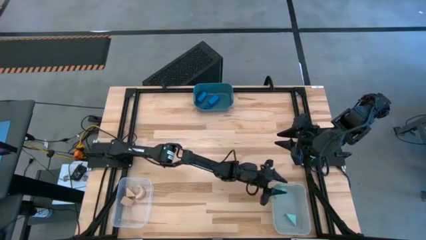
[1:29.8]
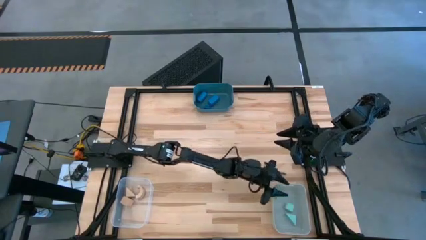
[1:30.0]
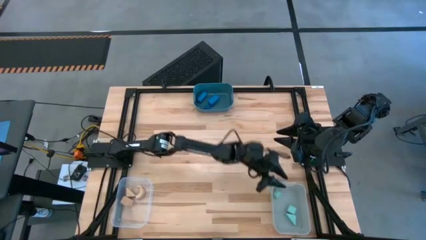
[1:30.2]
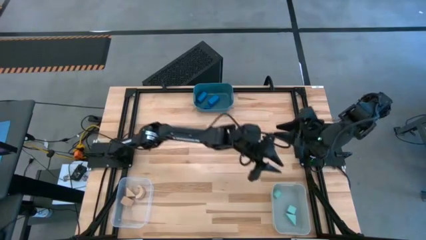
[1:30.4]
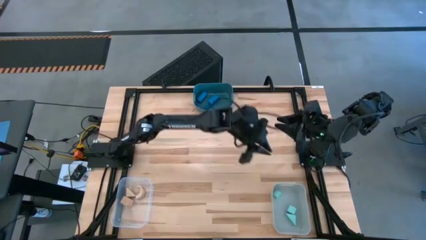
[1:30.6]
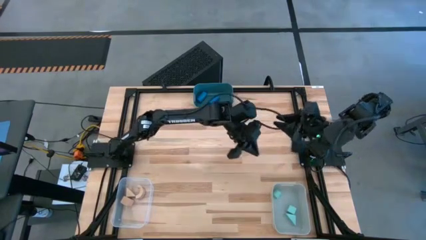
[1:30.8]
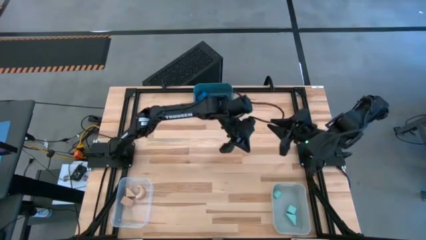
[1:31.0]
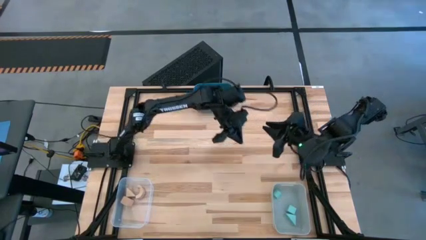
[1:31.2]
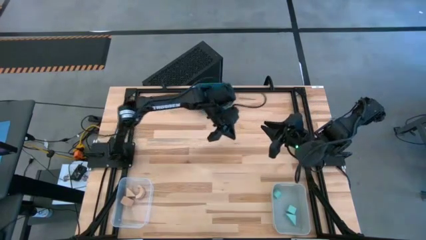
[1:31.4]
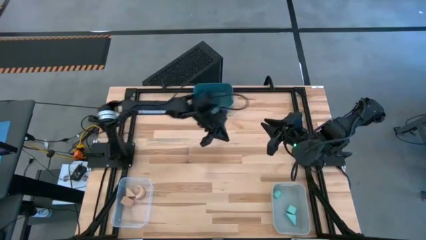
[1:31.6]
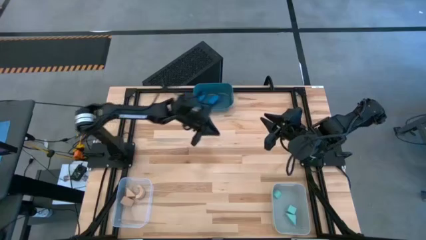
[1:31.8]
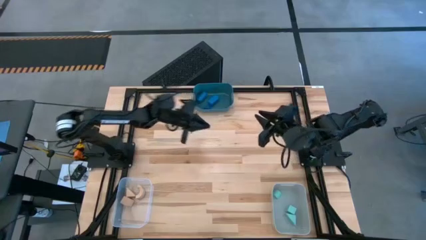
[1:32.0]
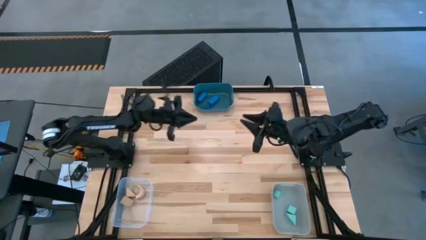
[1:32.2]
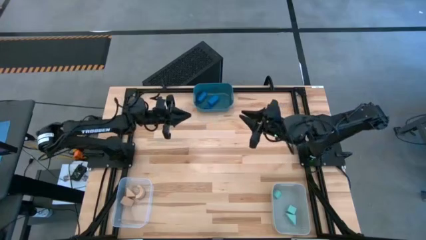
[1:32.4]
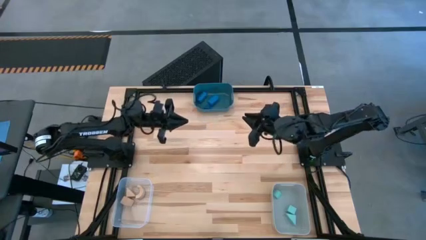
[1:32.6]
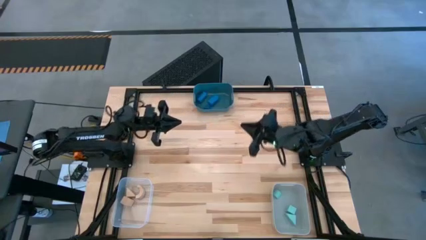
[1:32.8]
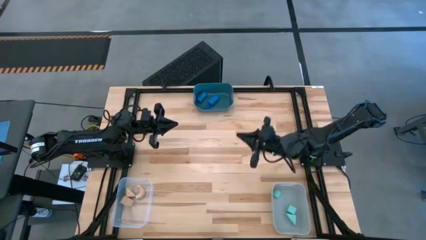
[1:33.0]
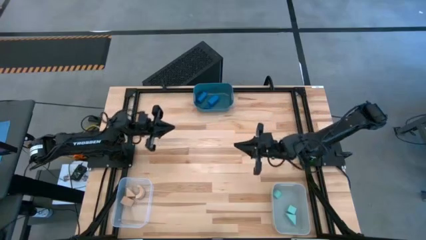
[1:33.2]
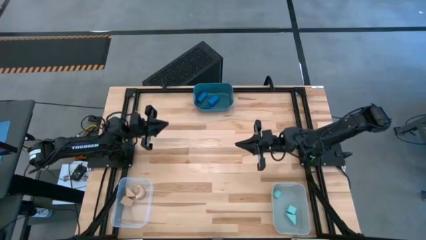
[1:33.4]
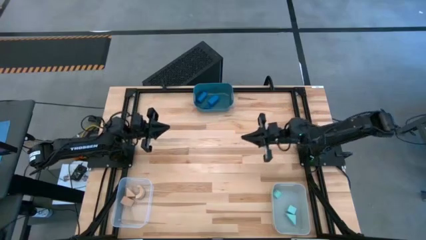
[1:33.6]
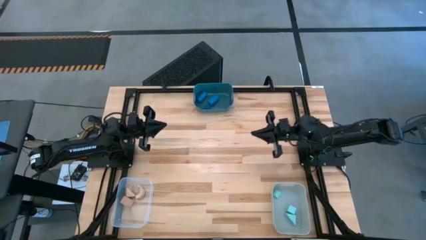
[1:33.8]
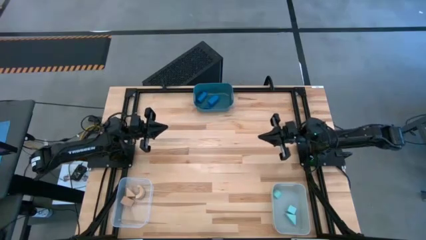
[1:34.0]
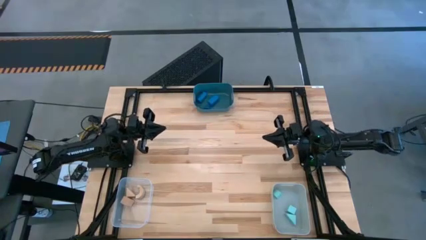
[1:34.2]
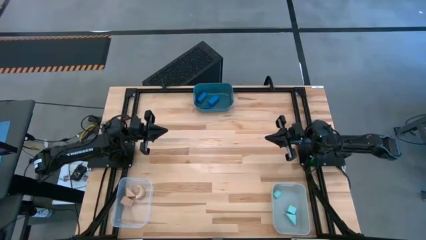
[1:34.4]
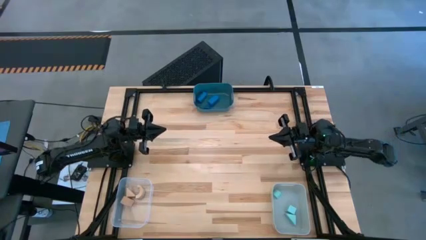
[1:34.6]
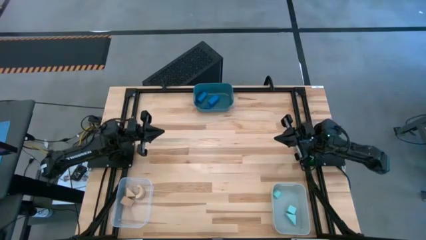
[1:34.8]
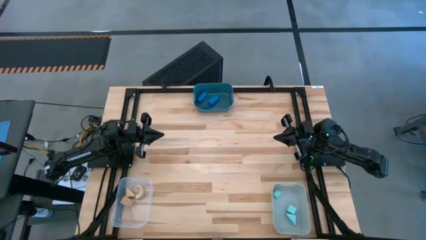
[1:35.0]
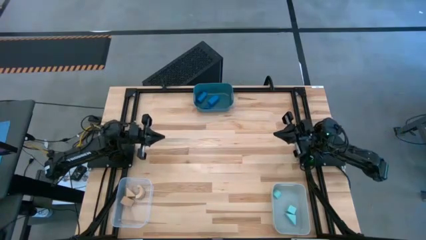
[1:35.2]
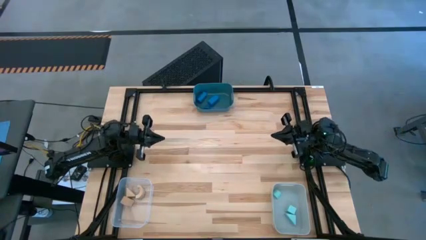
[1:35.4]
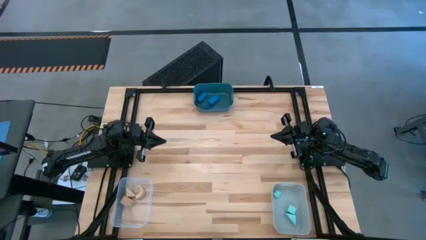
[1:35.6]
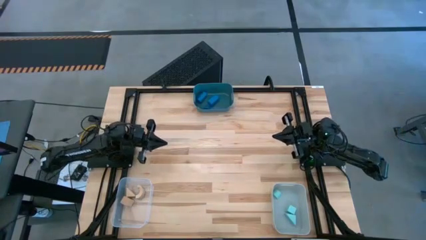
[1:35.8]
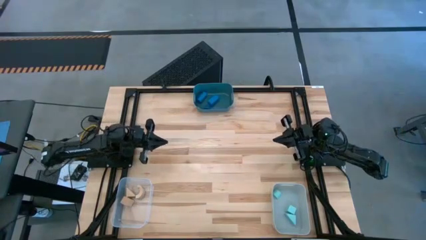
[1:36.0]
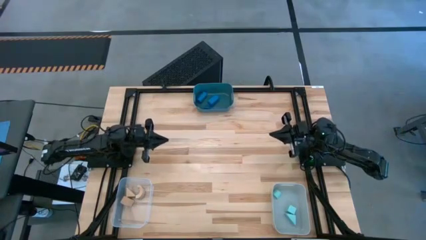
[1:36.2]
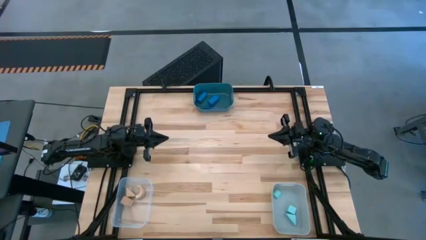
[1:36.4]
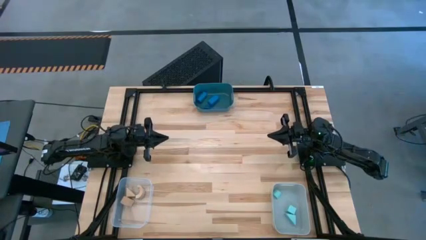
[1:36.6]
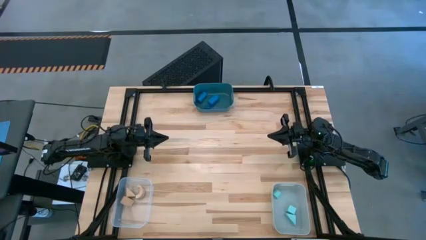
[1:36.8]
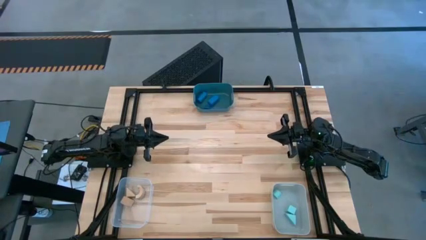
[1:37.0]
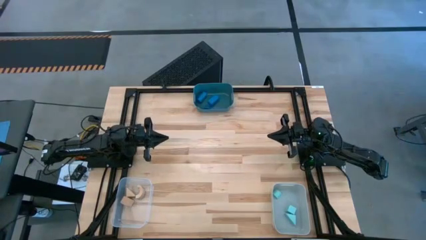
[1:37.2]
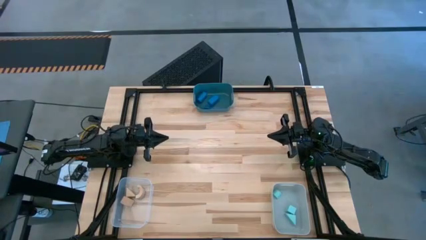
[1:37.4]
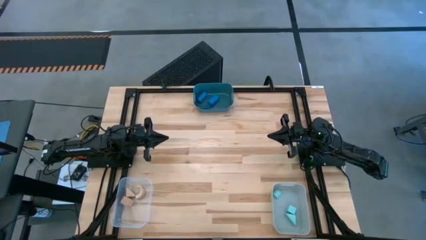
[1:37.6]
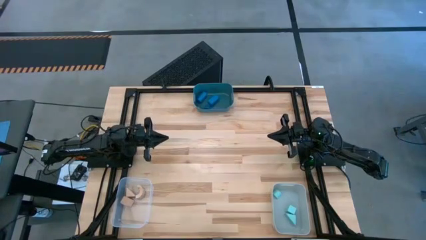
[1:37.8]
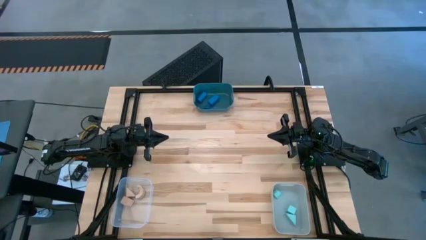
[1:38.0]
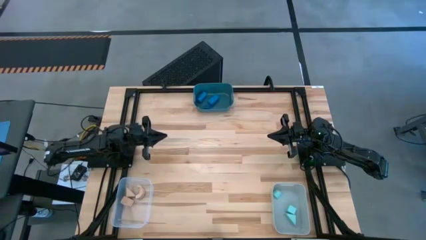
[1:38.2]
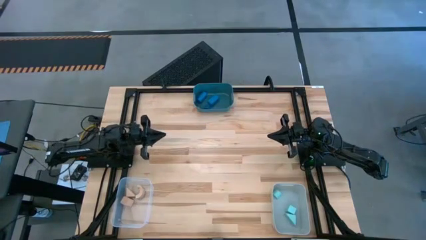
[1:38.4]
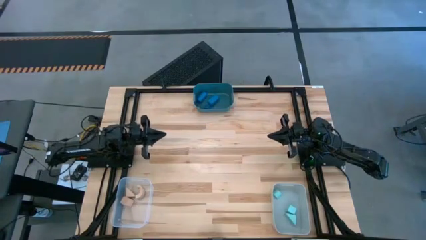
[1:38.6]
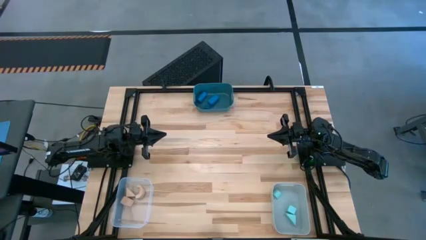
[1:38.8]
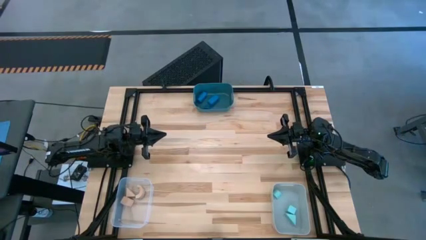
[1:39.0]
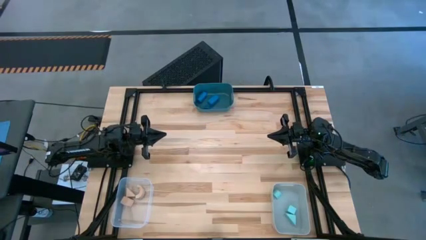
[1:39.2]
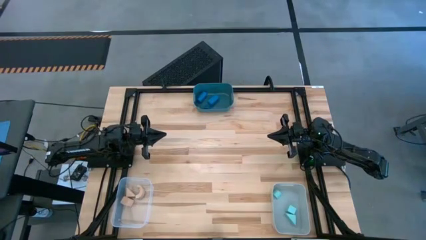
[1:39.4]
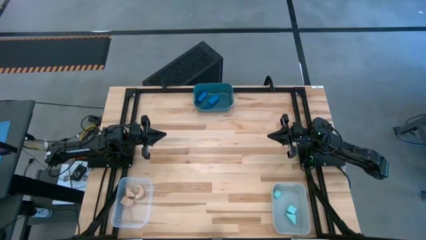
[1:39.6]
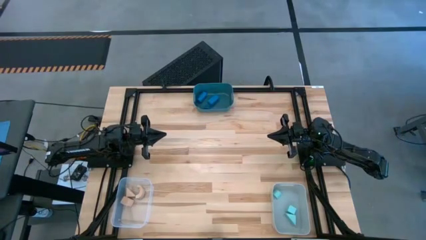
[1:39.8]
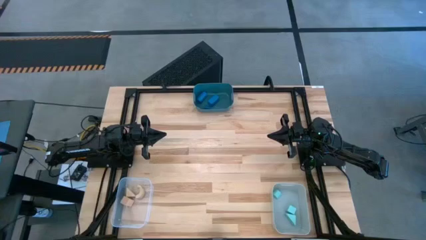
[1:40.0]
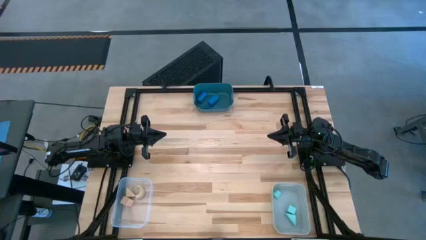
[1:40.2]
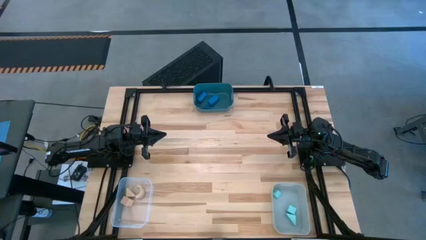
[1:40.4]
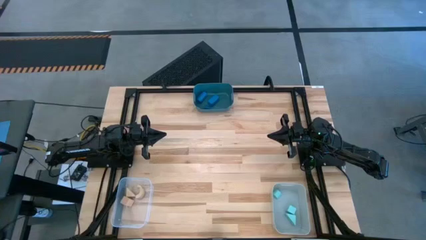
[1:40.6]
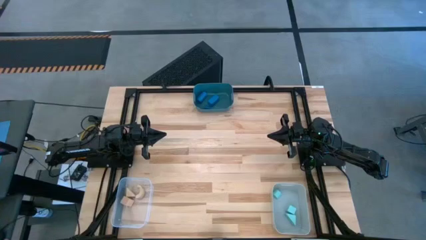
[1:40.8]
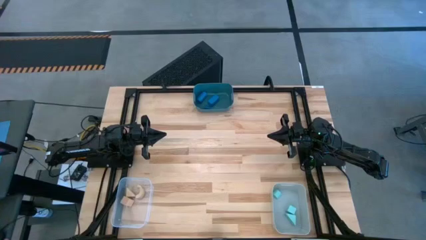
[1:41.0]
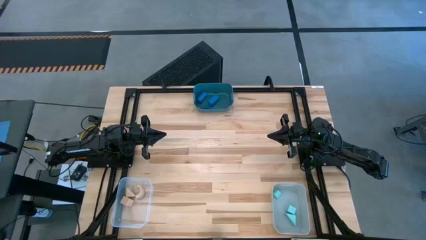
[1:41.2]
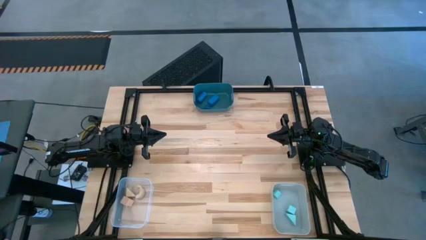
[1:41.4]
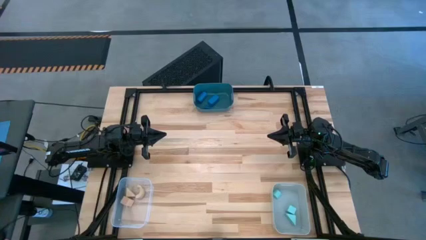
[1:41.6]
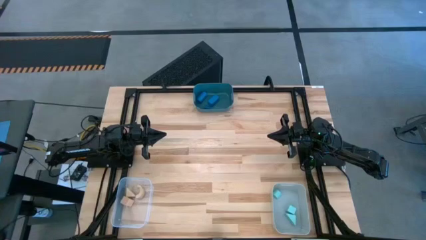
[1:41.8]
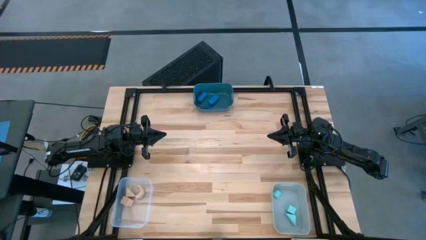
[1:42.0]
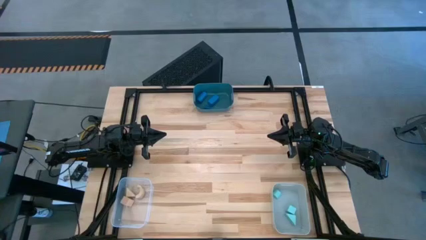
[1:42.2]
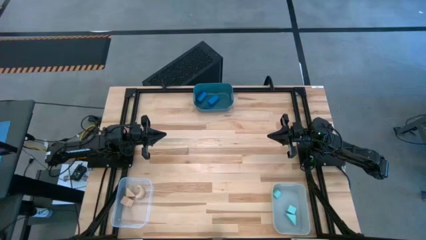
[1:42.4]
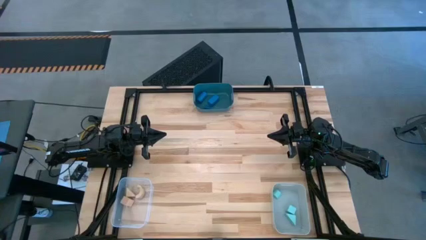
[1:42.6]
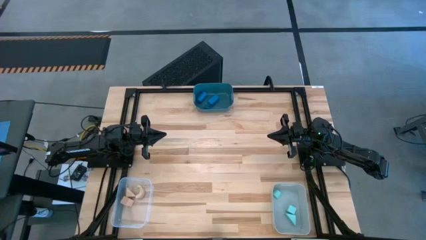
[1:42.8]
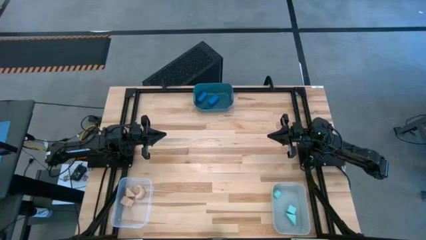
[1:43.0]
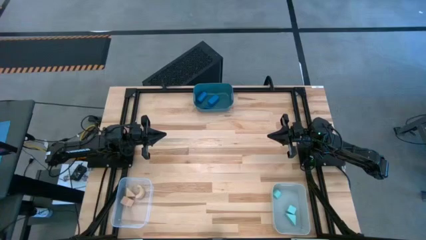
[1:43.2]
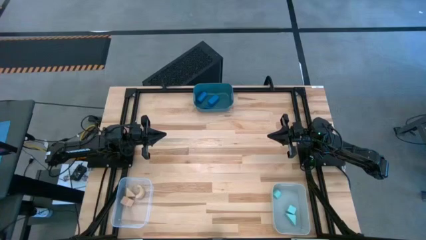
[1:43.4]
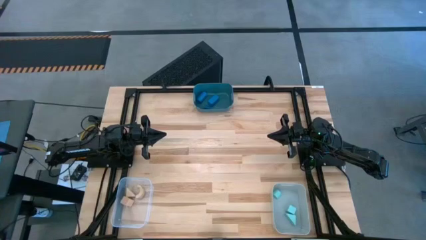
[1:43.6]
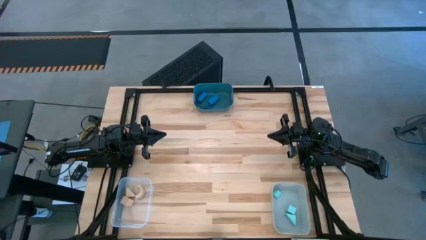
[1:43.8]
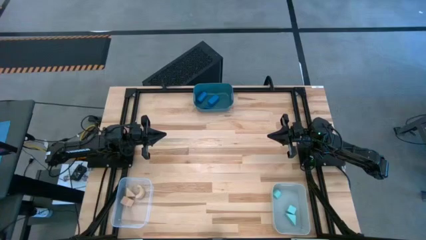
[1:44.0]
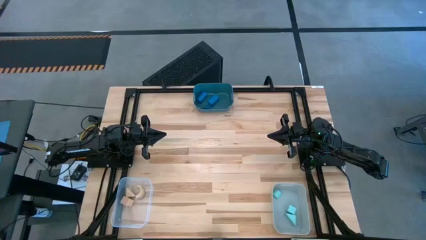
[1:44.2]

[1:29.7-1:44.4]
Task: Sort & place blocks by color
Return to Home Position
